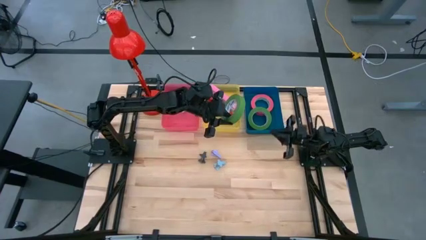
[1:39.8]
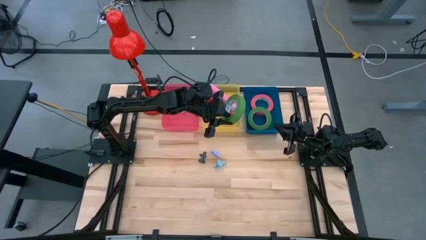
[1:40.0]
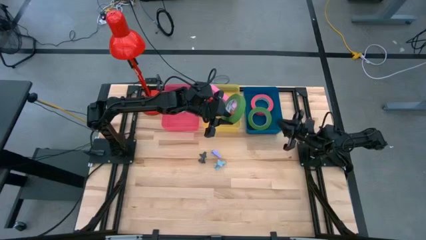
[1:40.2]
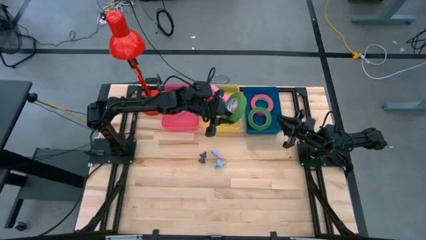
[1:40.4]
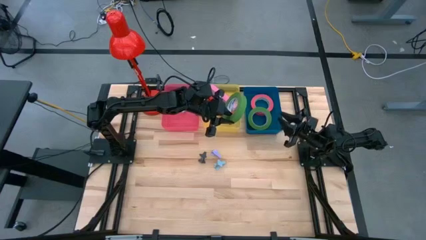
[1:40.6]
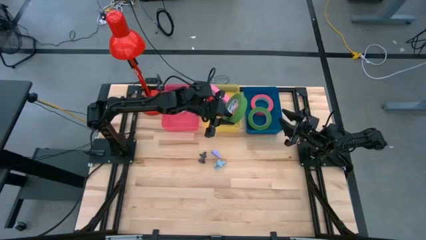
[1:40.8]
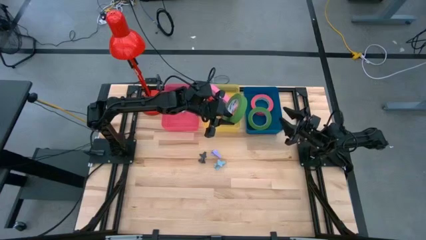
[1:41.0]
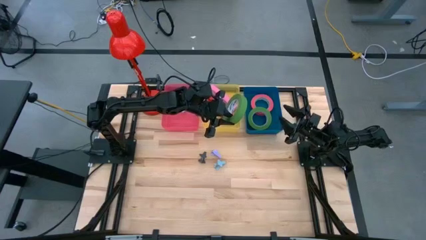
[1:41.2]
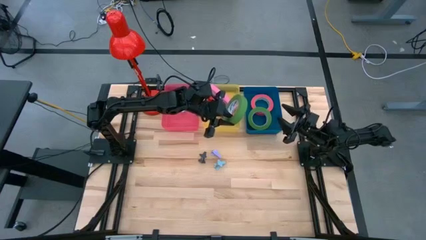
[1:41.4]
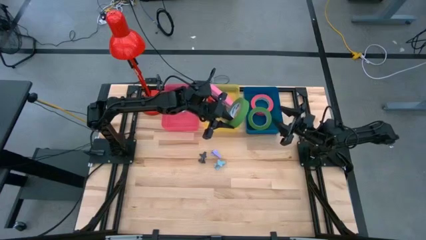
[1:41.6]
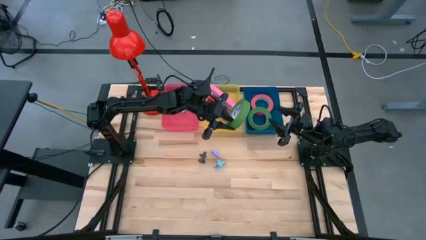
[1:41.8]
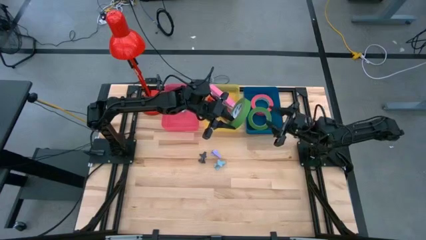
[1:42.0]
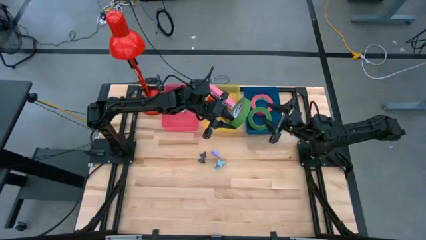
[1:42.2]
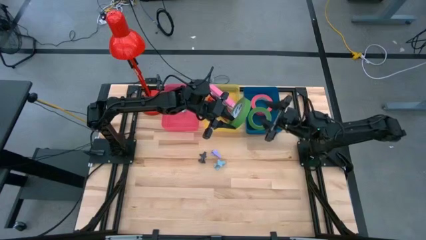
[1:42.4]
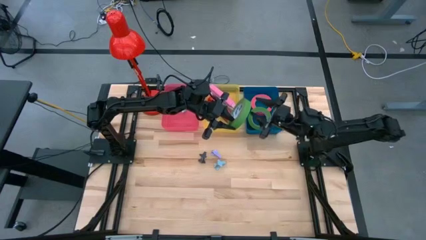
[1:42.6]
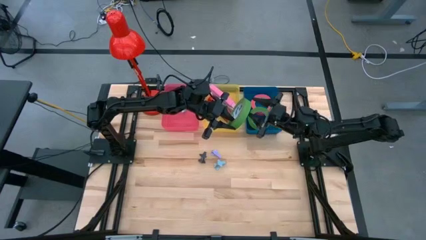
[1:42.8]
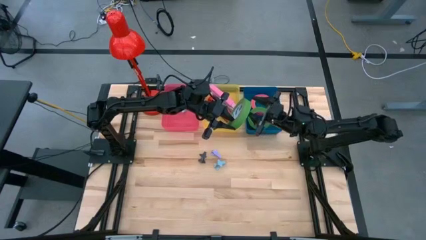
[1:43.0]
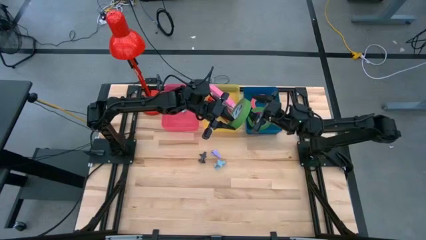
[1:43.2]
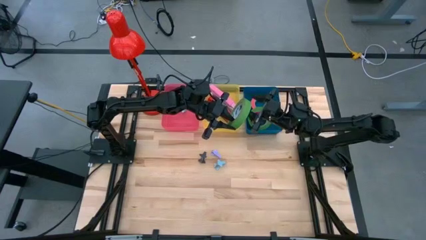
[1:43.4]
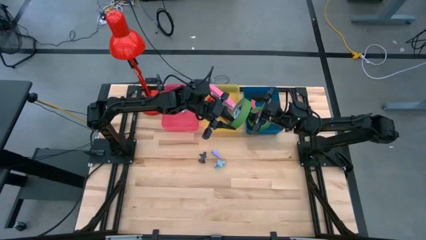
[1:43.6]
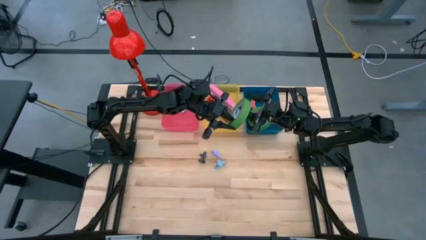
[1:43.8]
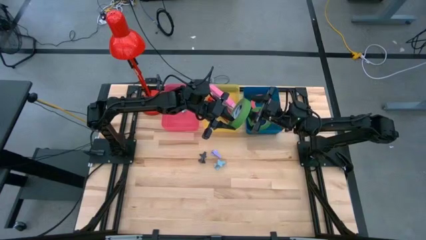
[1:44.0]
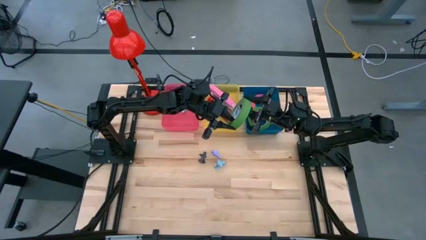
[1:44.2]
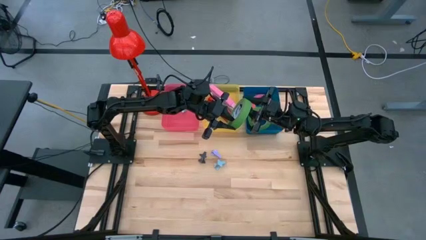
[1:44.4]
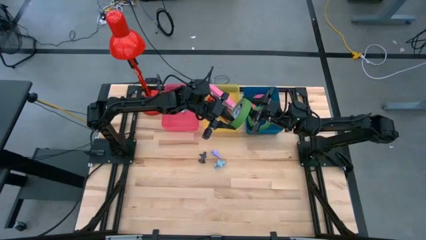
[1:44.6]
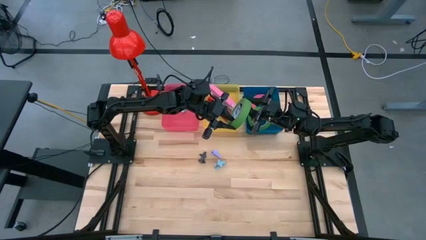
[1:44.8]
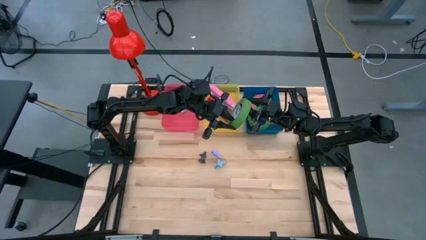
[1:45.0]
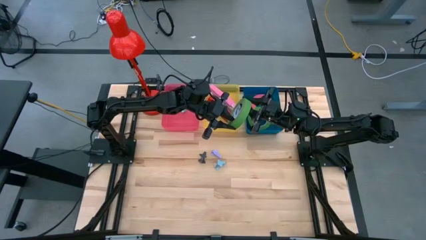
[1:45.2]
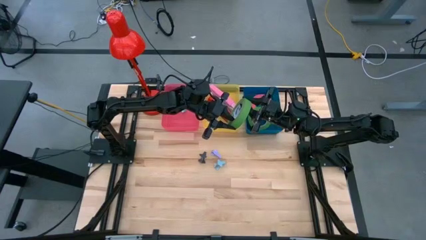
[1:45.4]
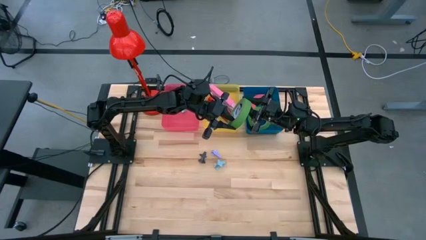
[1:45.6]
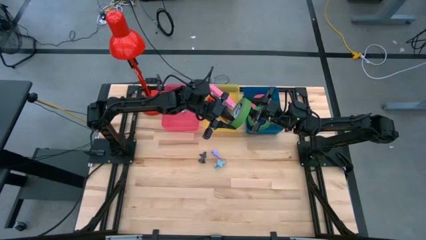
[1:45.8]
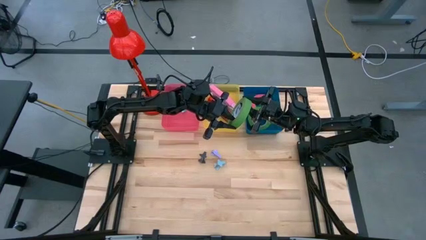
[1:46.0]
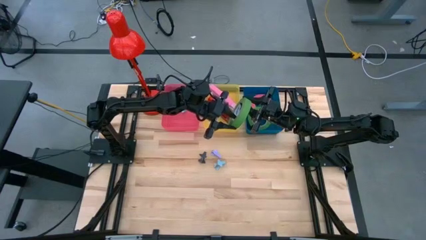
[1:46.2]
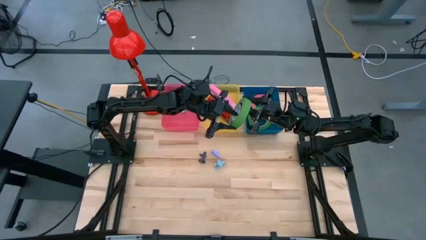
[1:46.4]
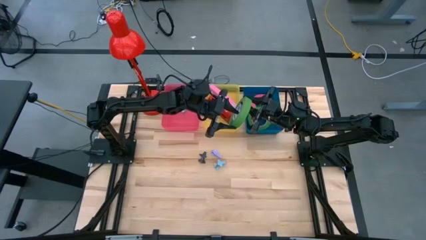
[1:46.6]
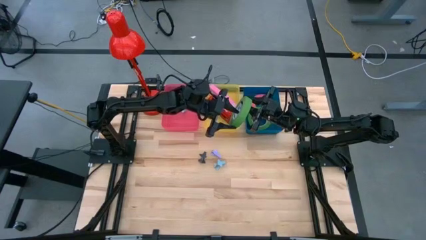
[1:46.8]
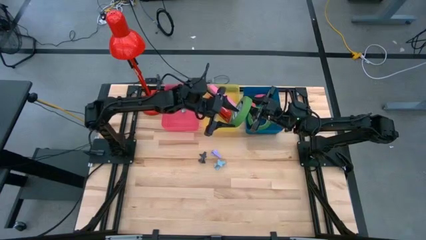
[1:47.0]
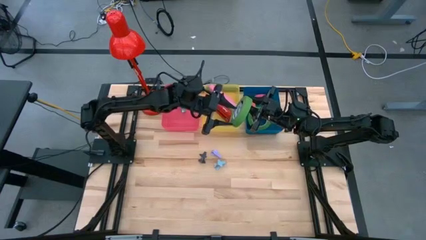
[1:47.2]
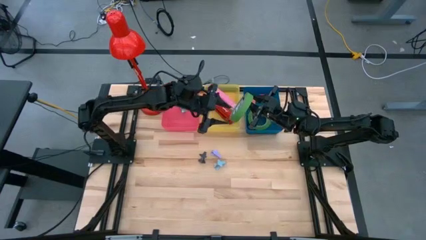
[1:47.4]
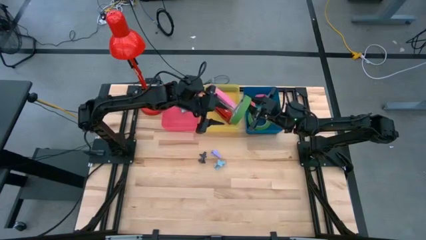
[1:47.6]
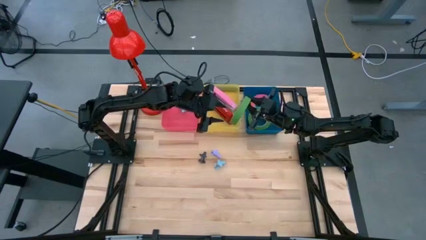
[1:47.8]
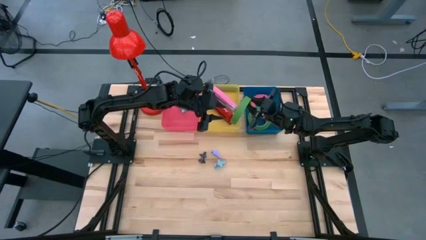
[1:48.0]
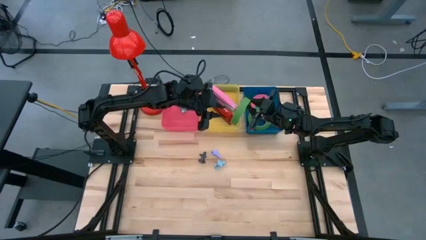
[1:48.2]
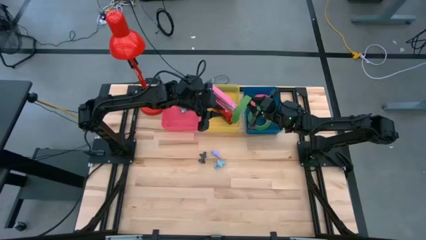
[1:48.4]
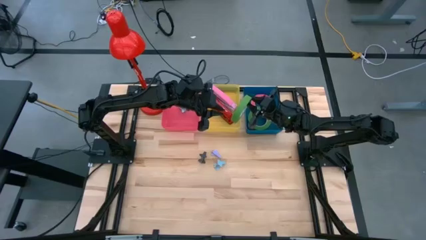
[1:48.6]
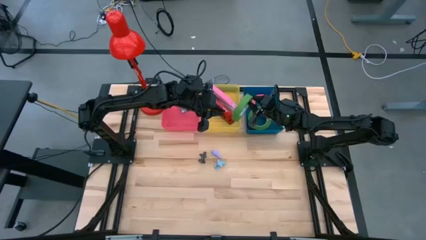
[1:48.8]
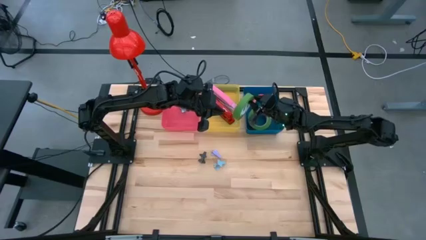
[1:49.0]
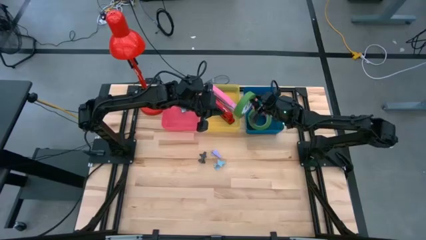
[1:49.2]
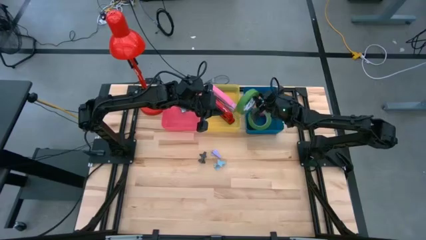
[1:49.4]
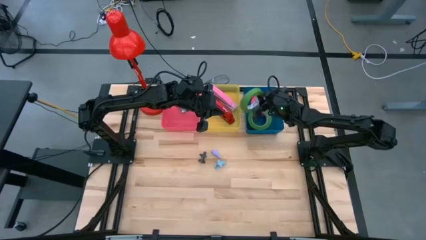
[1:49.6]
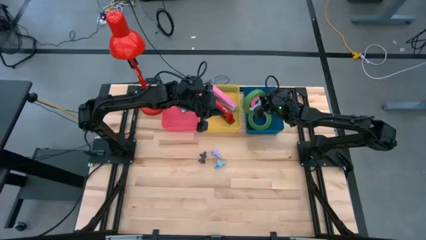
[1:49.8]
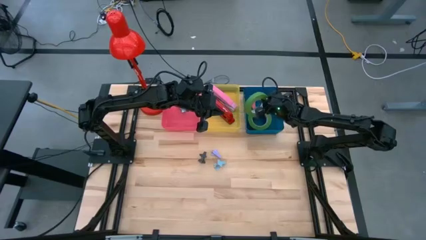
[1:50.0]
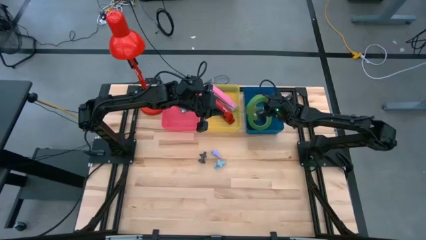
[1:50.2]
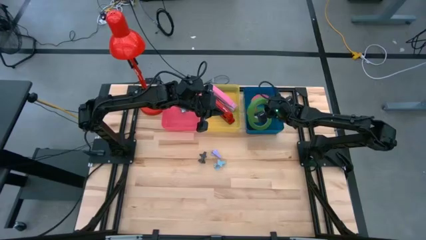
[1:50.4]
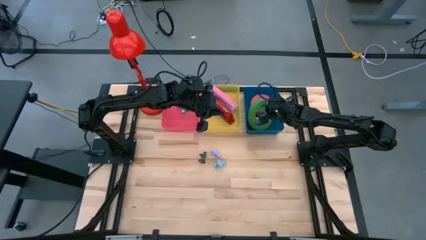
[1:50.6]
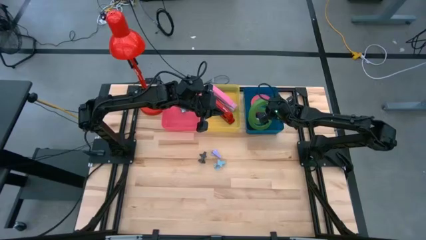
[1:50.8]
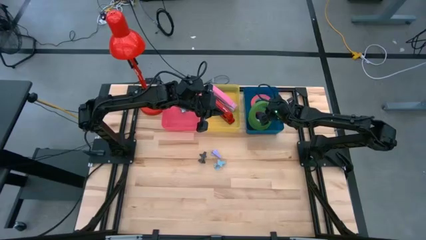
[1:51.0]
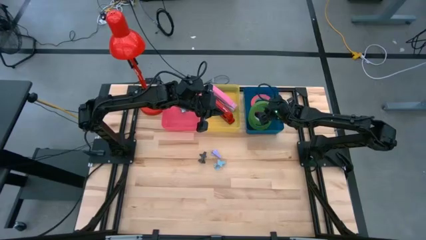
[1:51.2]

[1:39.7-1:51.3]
Task: Pick and place Stapler, Stapler remover, tape
Put the green tape into the blue bin
